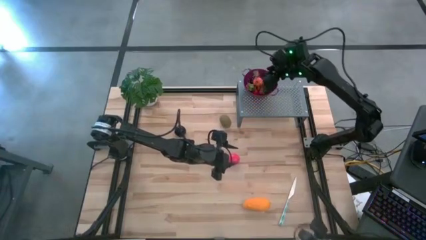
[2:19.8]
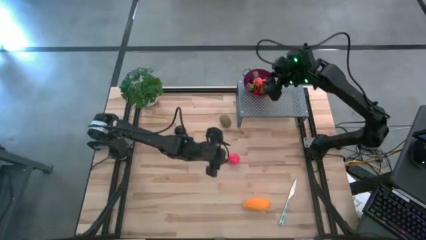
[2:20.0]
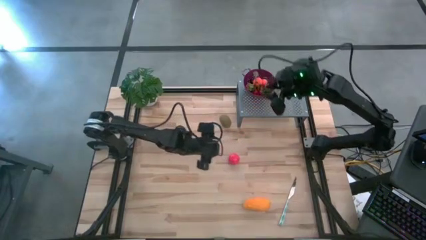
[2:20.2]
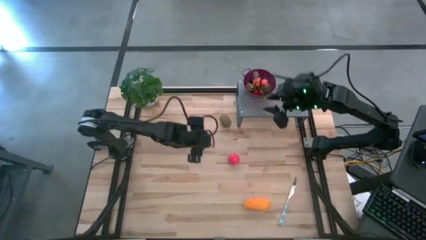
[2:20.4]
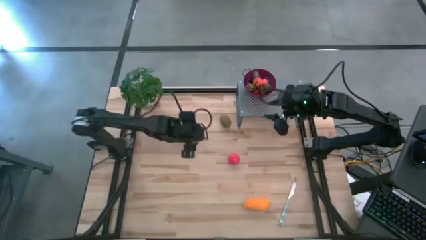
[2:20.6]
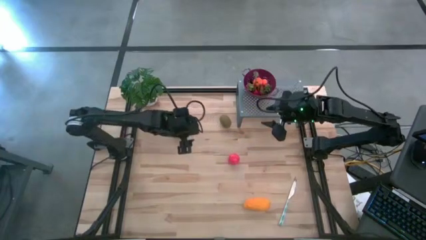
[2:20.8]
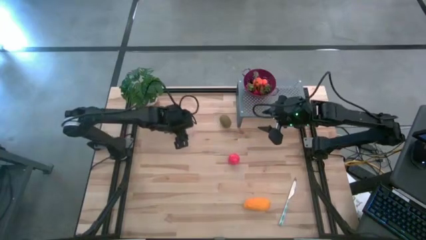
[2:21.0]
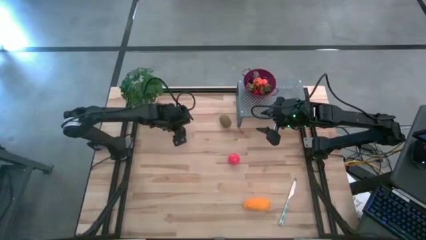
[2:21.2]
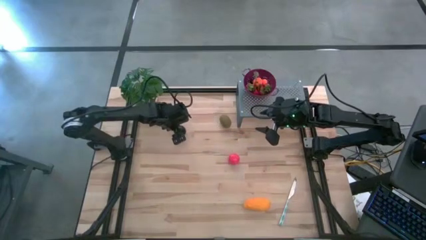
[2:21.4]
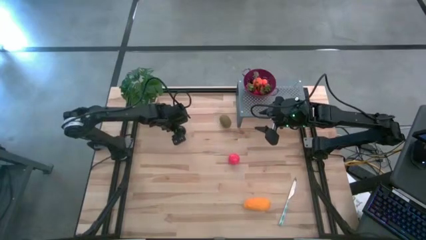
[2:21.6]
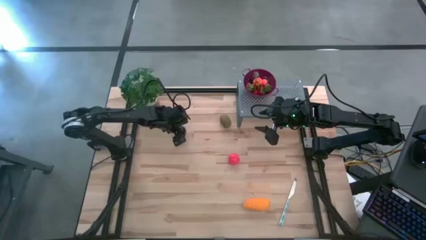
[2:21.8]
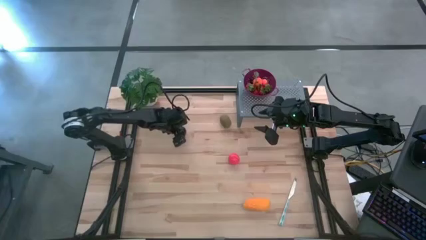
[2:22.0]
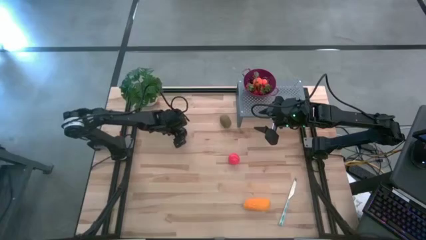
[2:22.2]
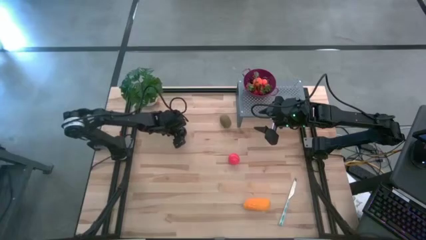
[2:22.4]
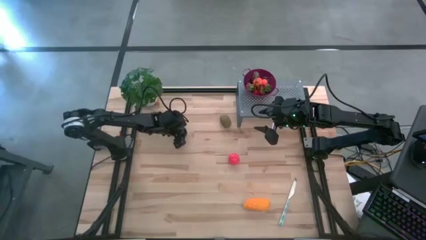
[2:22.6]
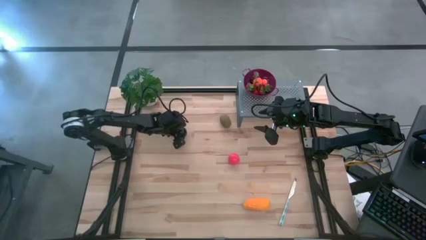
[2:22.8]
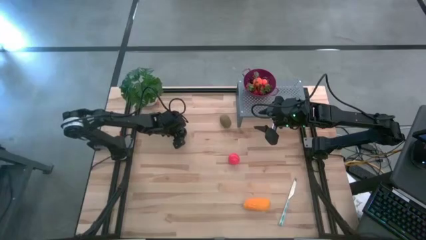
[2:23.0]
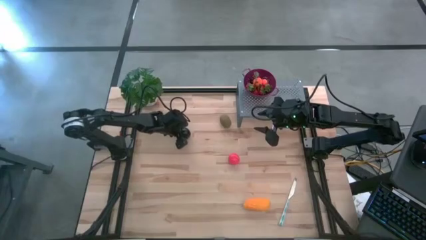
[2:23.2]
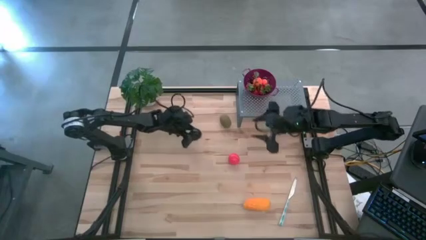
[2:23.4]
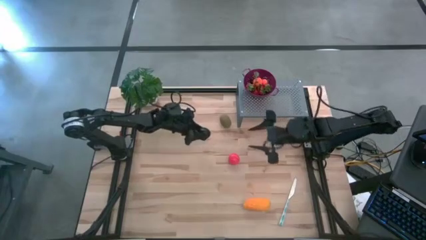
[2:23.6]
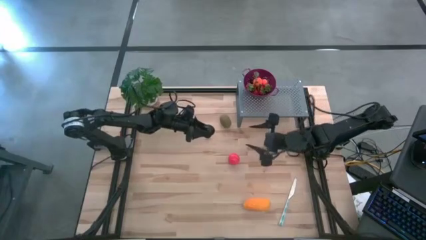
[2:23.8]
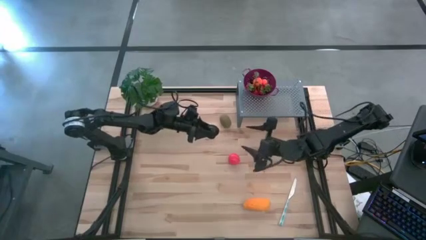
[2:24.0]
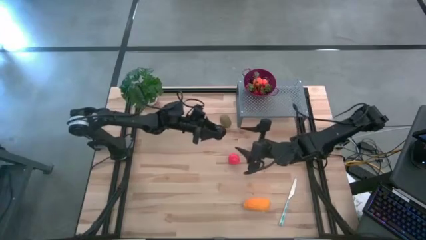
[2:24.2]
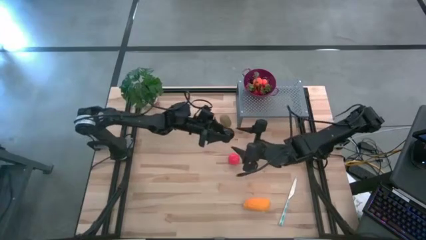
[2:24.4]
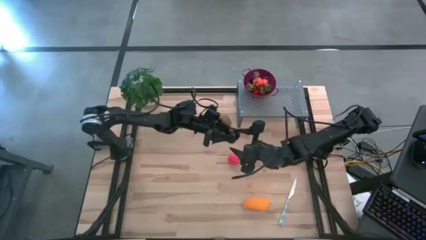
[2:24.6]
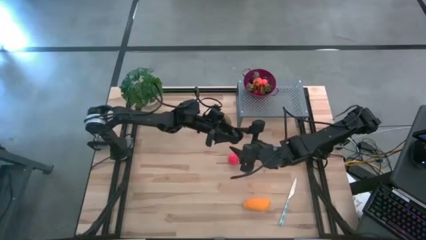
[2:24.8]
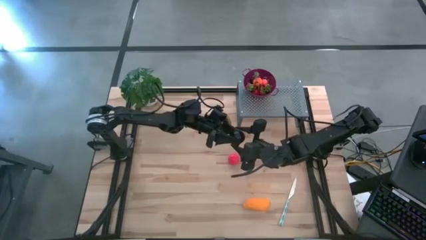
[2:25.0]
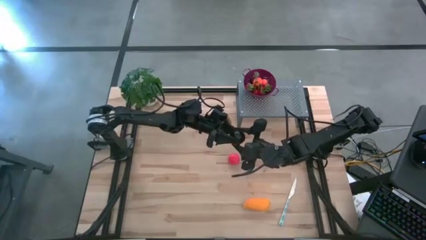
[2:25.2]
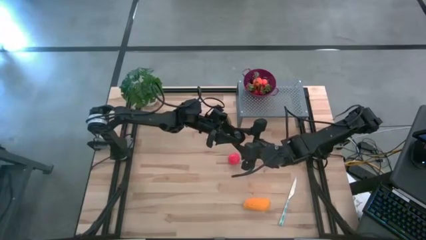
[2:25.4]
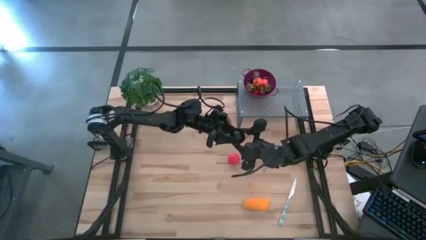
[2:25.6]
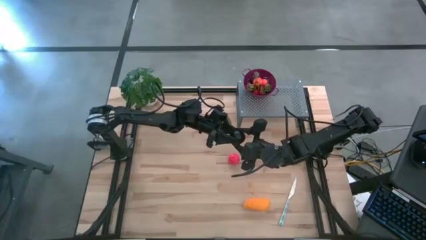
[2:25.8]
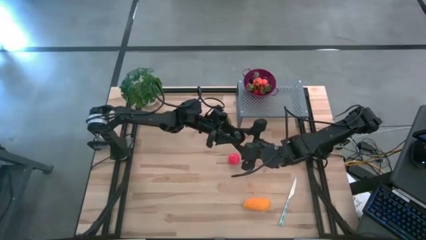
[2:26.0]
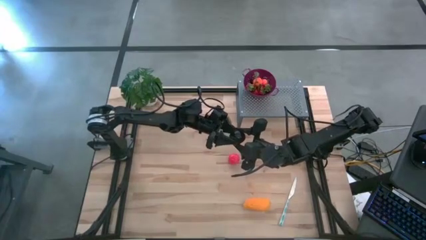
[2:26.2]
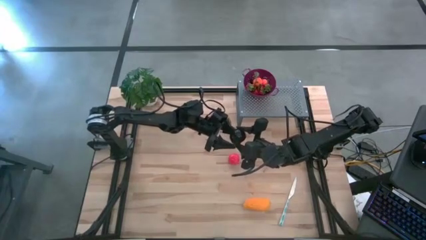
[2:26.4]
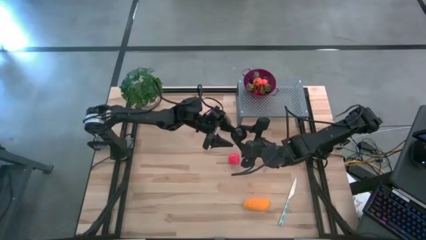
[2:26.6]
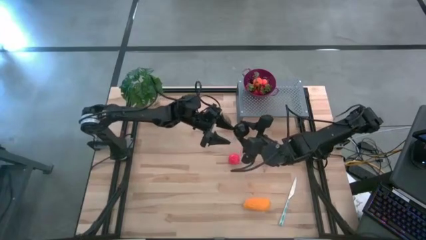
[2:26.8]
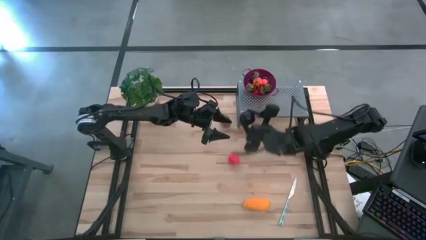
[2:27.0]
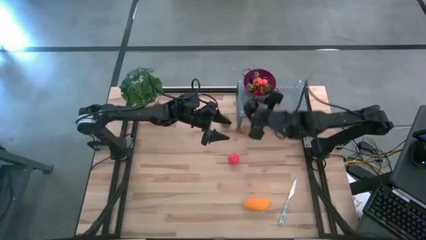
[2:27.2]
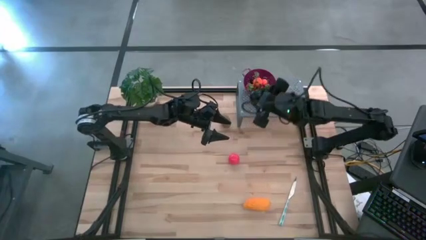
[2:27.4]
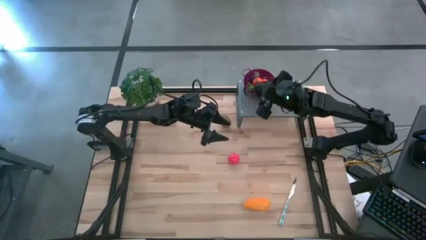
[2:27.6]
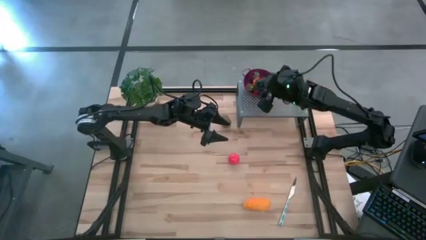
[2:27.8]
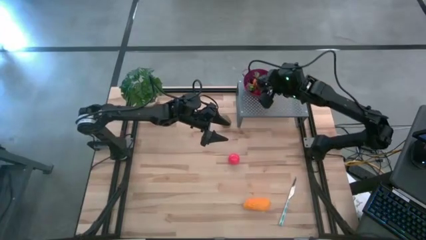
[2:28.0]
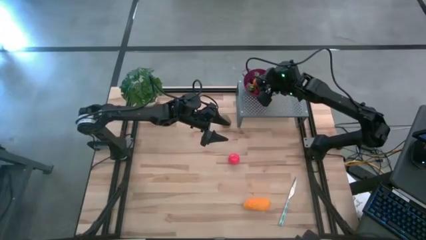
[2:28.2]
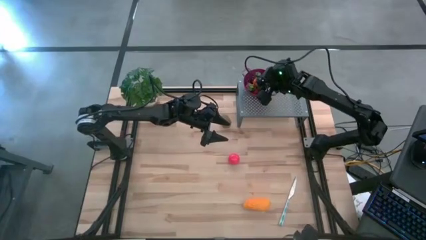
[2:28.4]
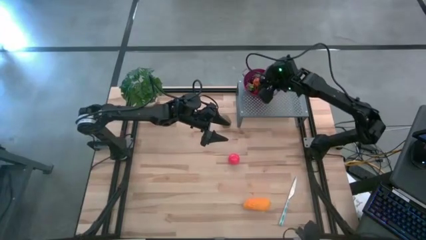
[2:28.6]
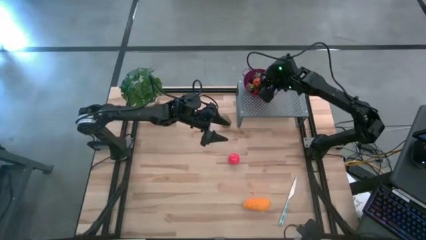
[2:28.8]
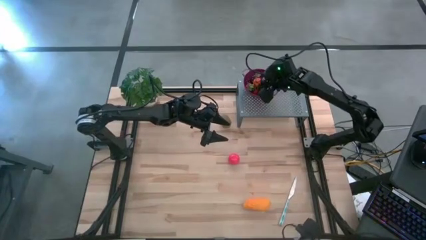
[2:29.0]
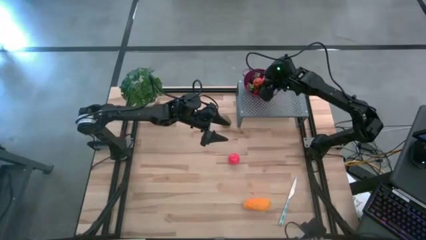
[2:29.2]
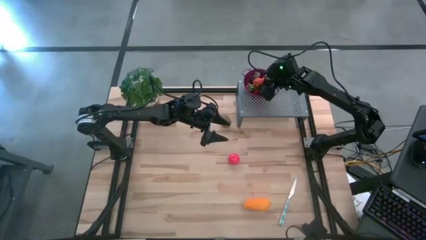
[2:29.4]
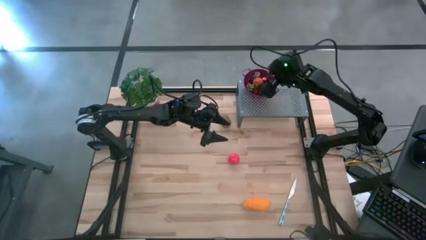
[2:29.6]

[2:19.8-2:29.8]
Task: Pick & Place Fruit
Put the plum into the violet strainer bowl on the shelf

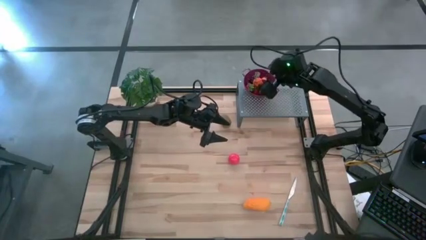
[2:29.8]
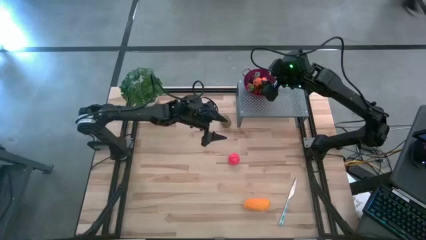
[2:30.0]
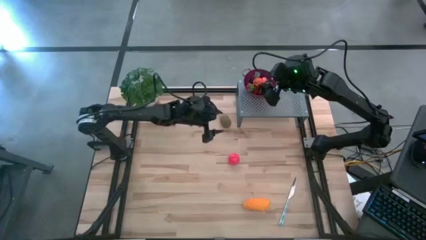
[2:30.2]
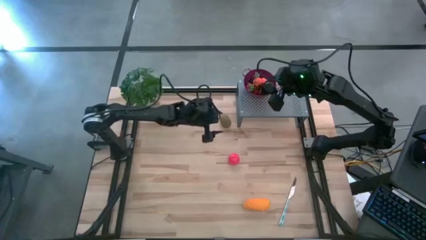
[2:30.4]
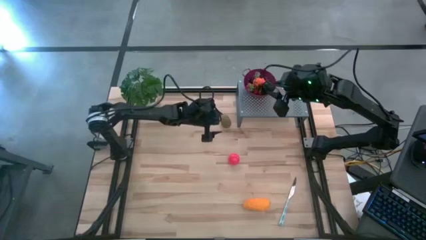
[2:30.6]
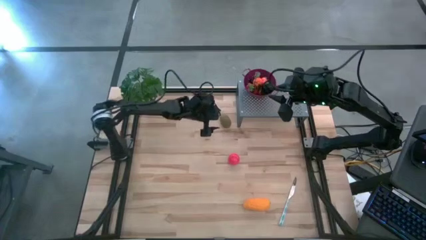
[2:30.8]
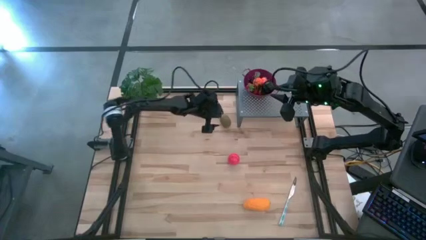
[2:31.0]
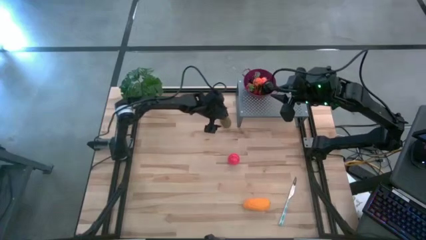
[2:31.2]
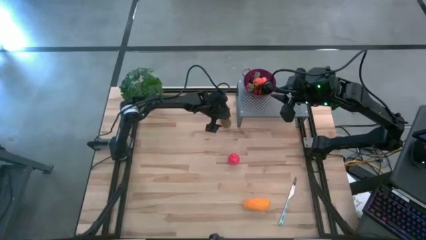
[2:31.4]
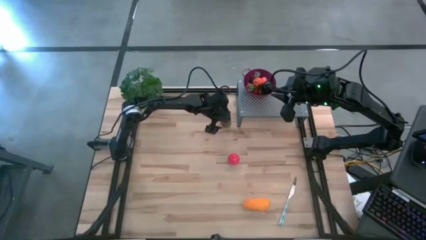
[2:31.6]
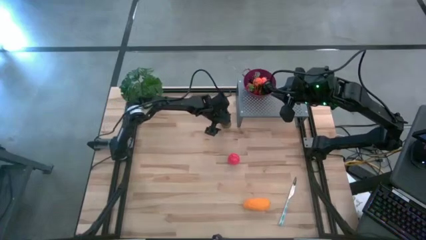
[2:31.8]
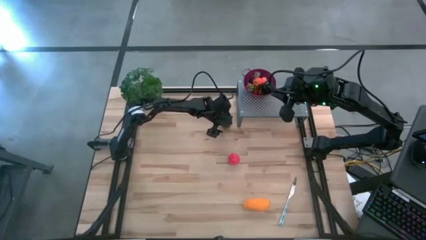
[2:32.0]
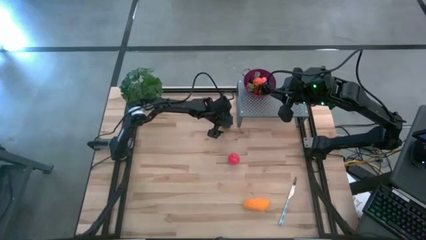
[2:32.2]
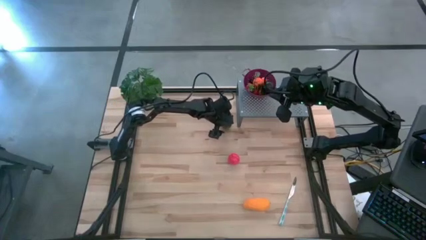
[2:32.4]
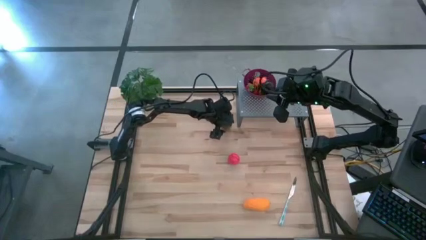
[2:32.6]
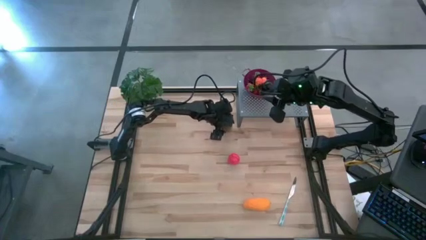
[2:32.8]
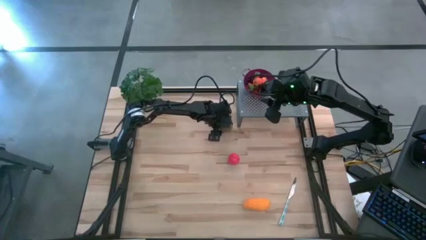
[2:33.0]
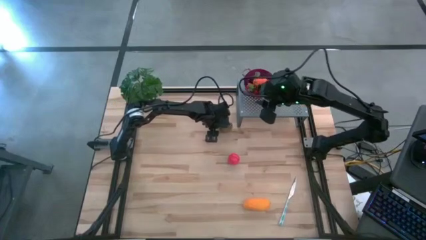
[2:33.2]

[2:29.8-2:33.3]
Put the kiwi into the violet strainer bowl on the shelf

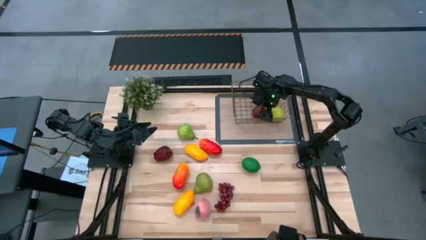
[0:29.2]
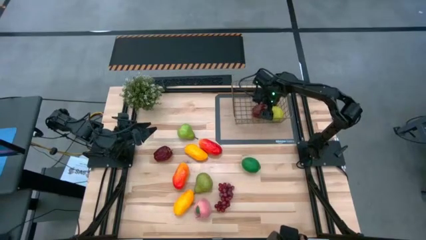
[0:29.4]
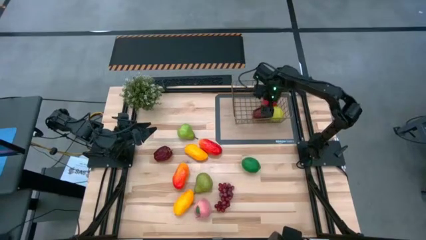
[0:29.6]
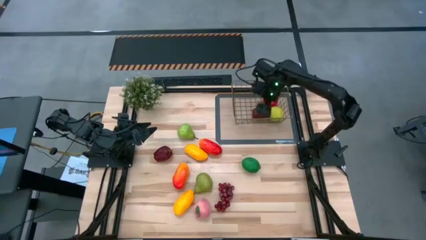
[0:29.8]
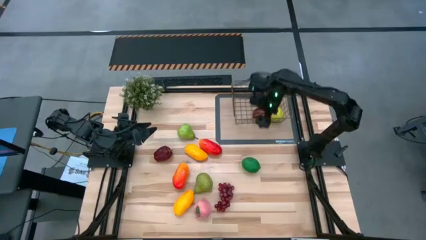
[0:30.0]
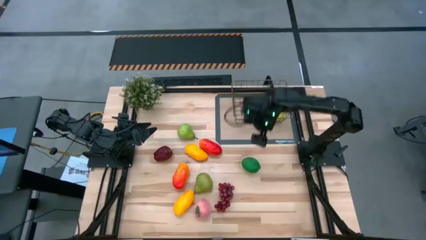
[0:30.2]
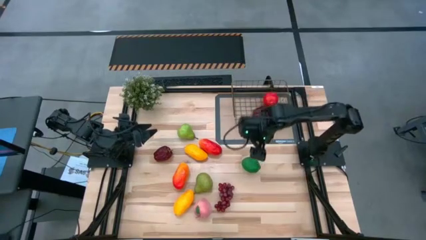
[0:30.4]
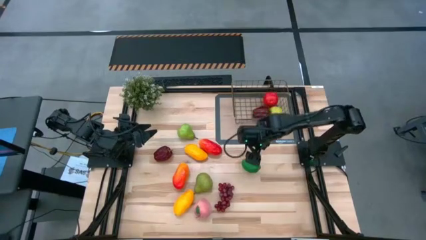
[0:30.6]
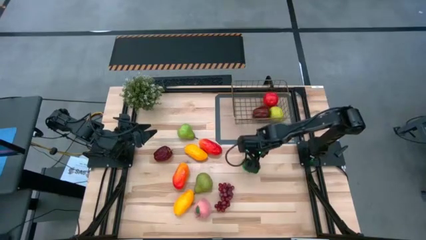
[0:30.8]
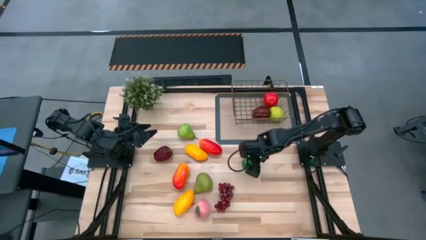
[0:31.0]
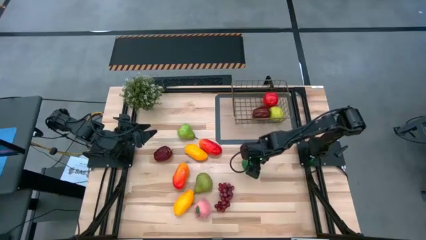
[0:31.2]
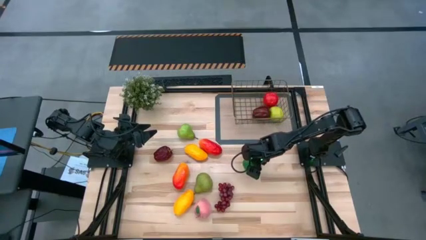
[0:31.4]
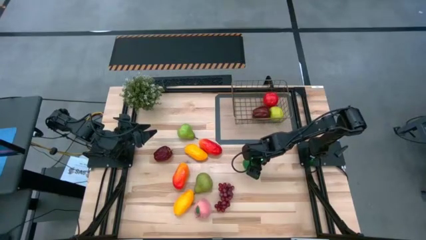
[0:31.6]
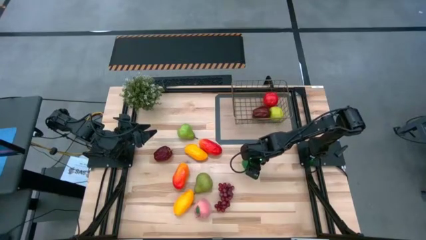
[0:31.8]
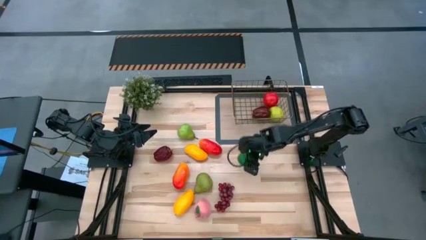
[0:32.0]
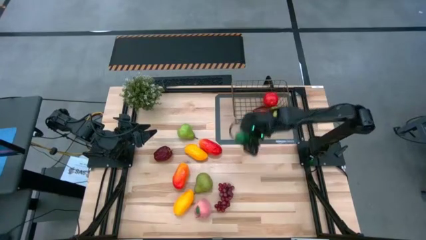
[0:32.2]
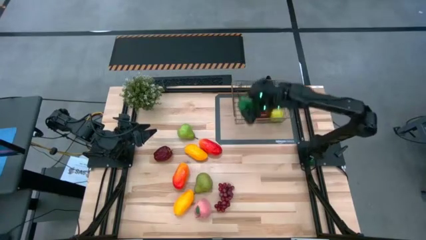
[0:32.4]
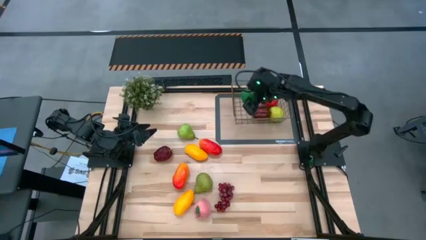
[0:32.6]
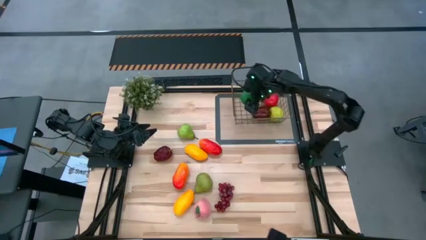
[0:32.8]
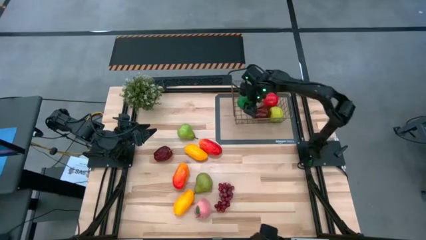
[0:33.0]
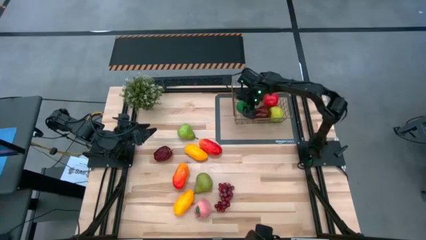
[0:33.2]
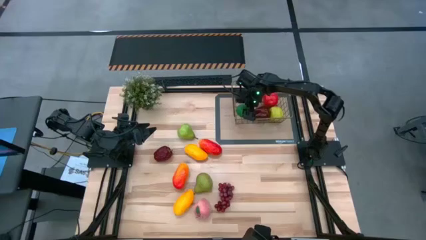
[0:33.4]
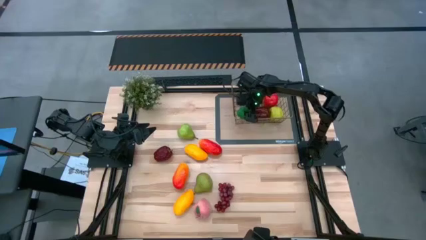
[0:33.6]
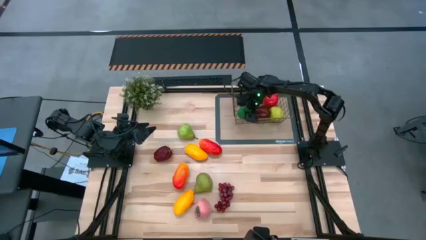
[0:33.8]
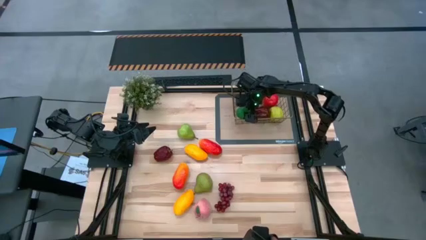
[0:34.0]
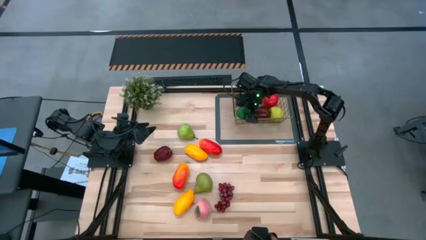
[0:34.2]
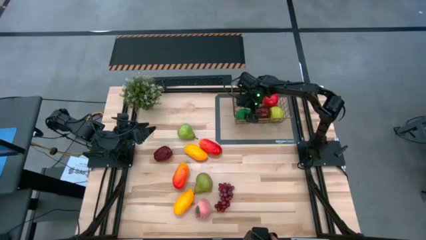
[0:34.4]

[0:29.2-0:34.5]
Task: Build produce basket
Put the lime into the gold wire basket
